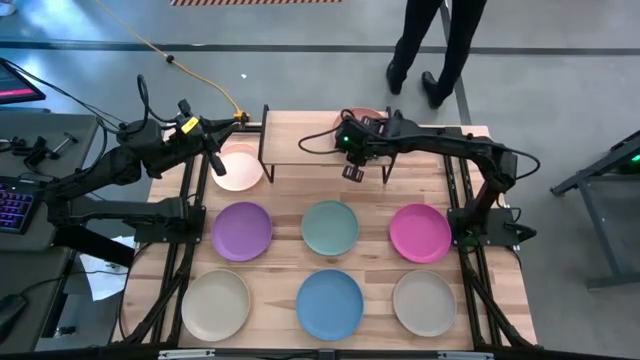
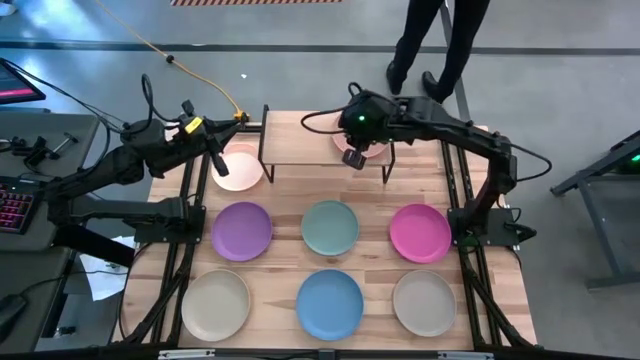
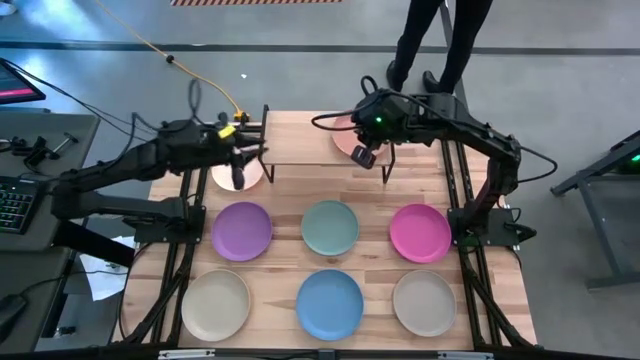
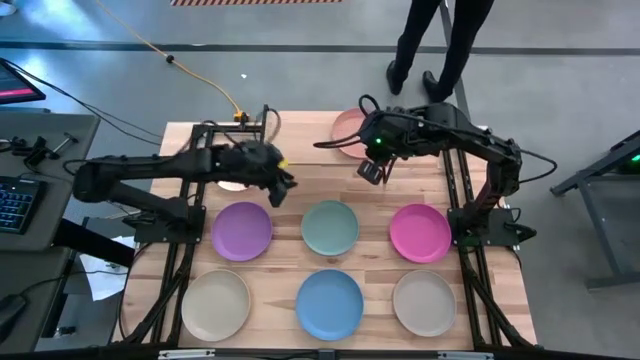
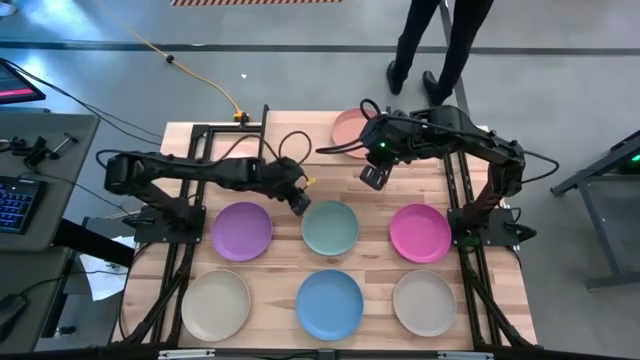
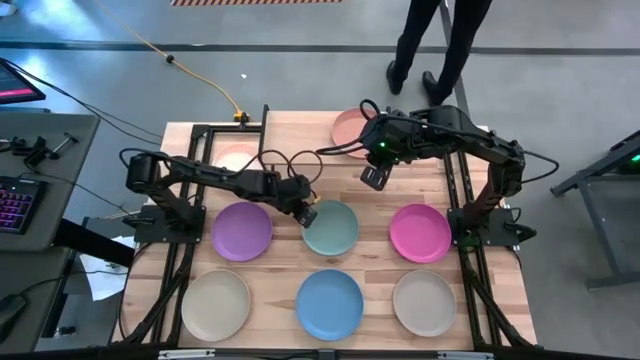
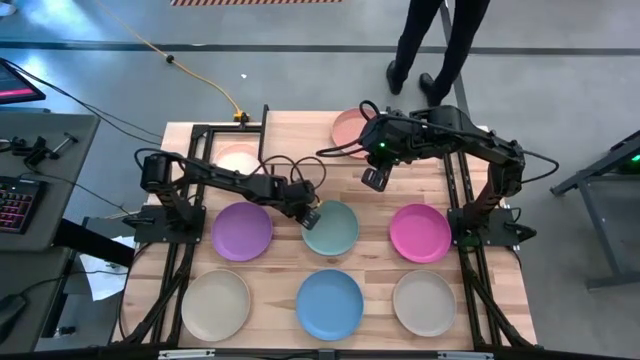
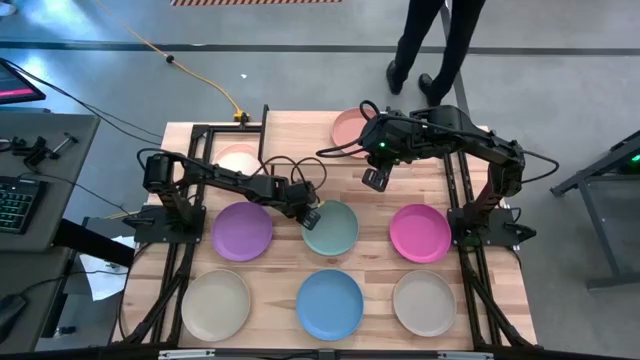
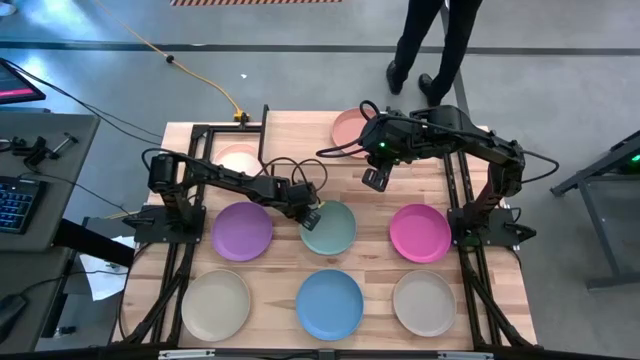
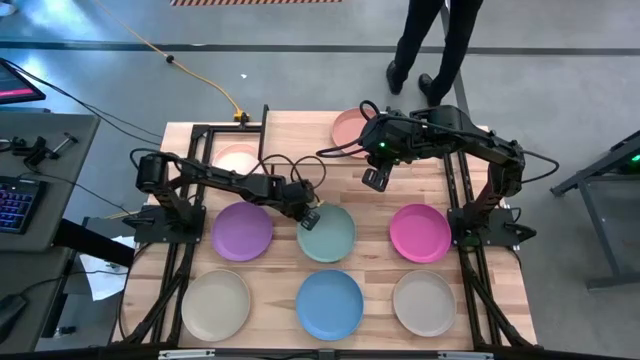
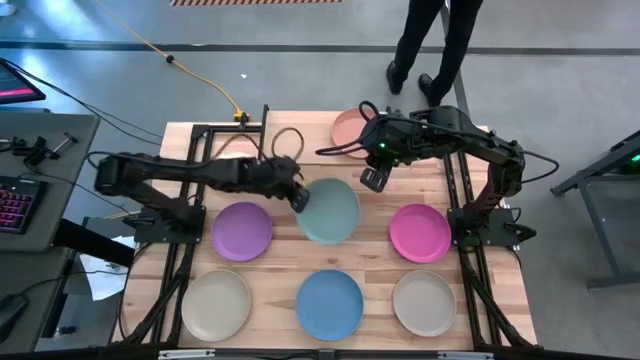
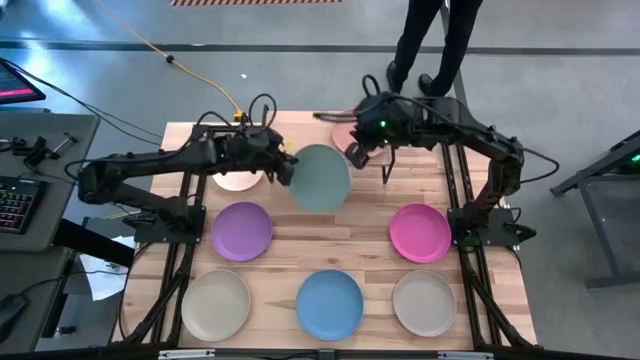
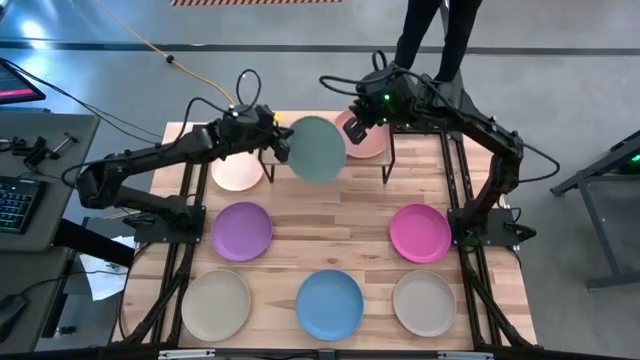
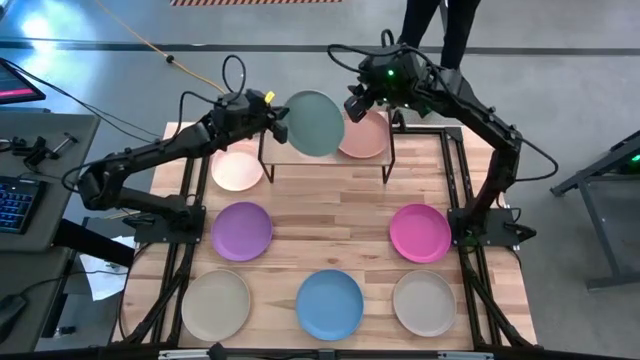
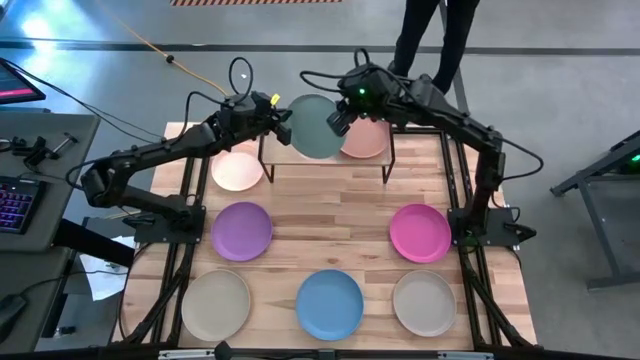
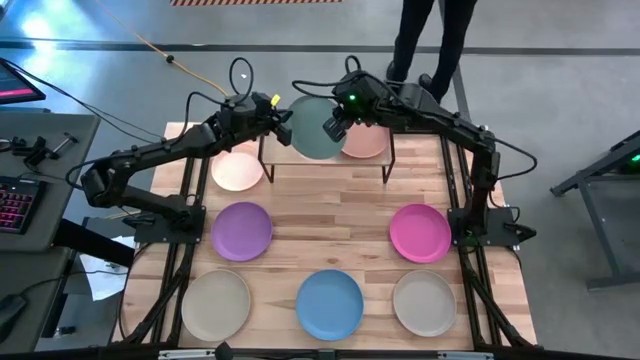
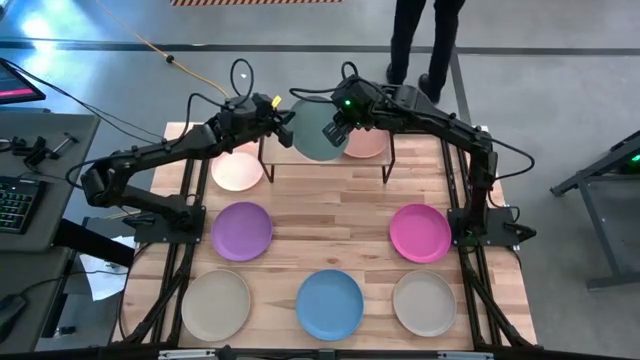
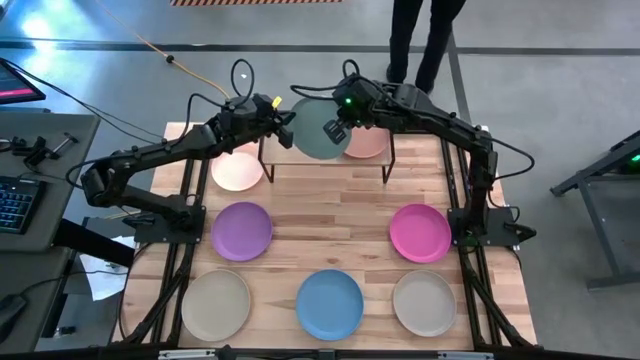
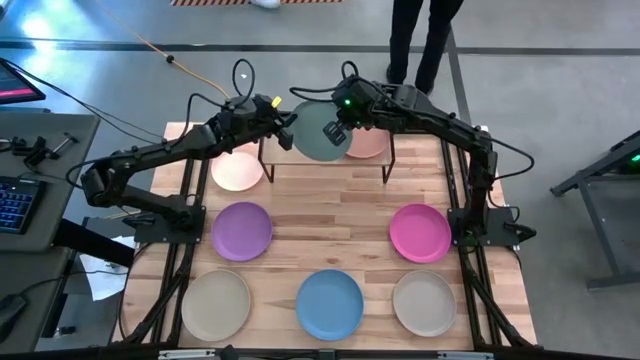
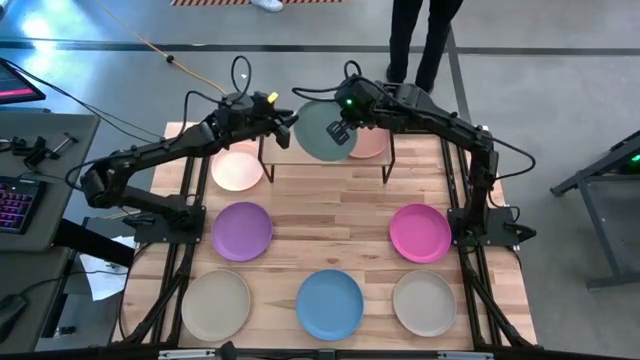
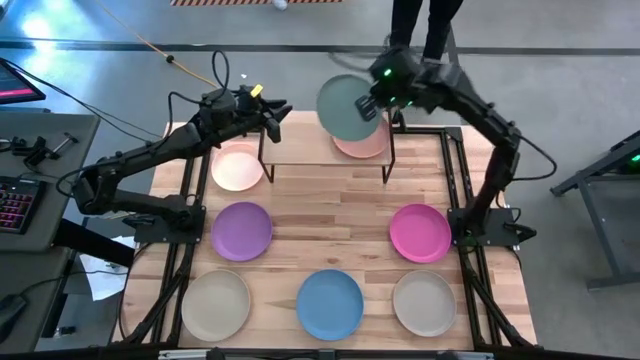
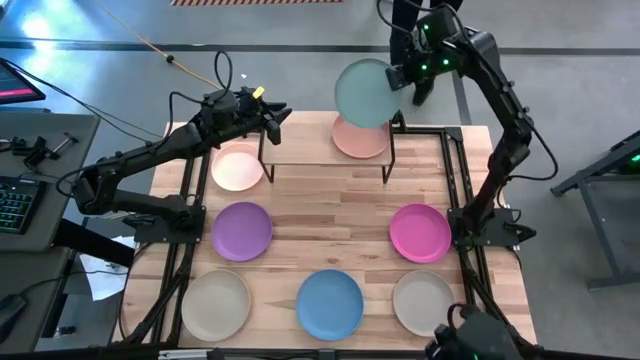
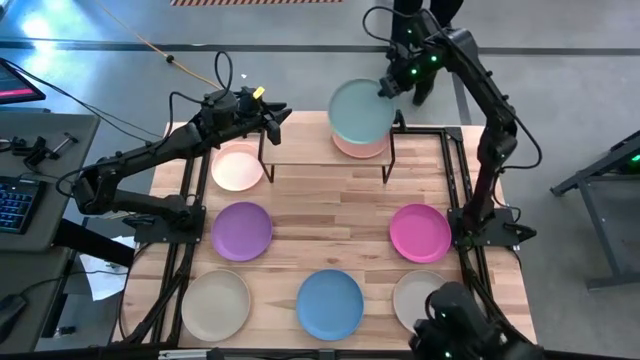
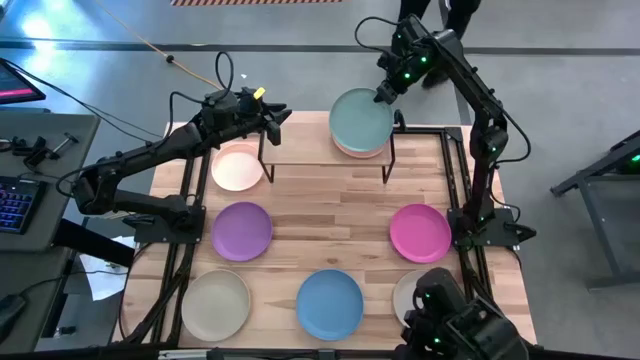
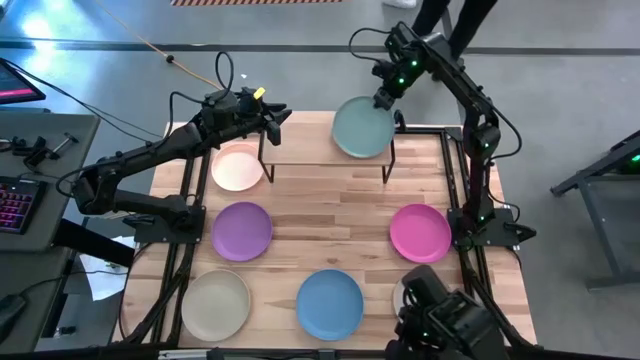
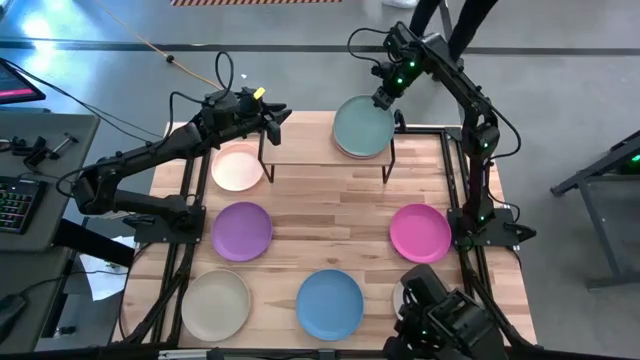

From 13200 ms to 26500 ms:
Task: Place and stack plates onto a shelf
Stack the light green plate on top of the orange plate on the shelf

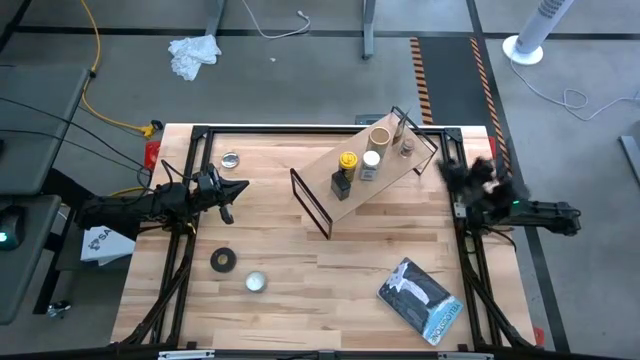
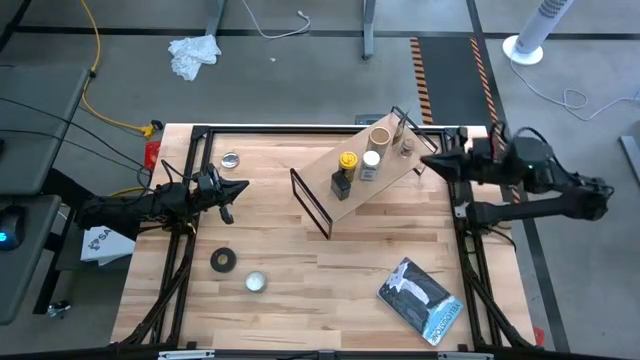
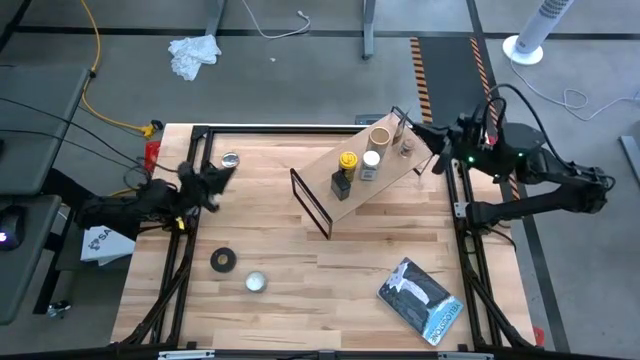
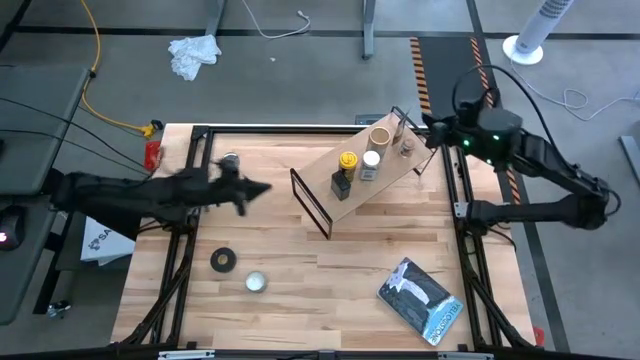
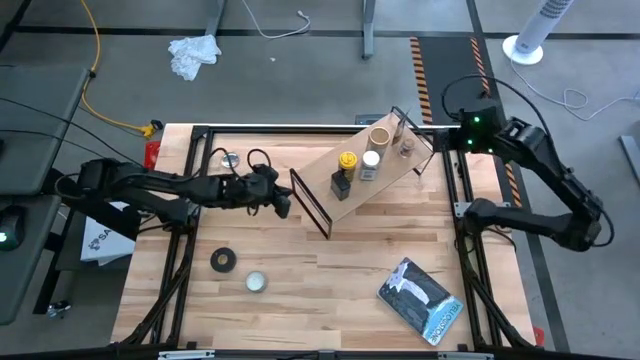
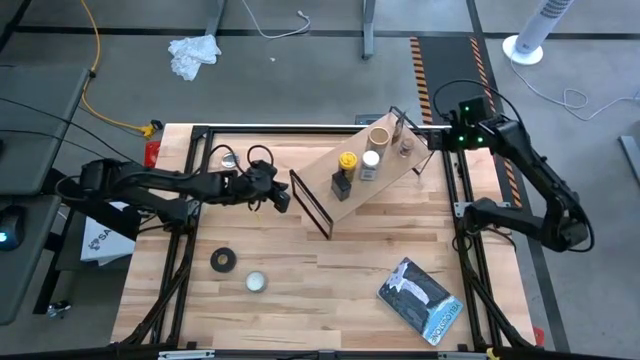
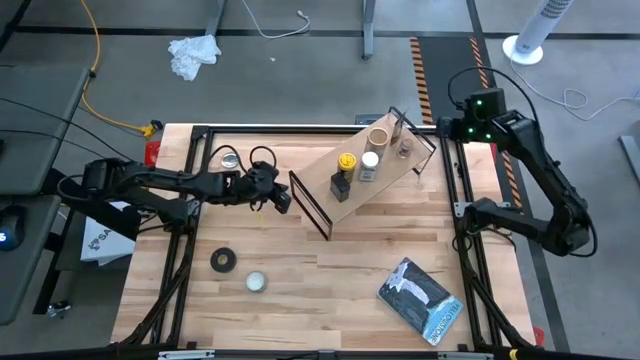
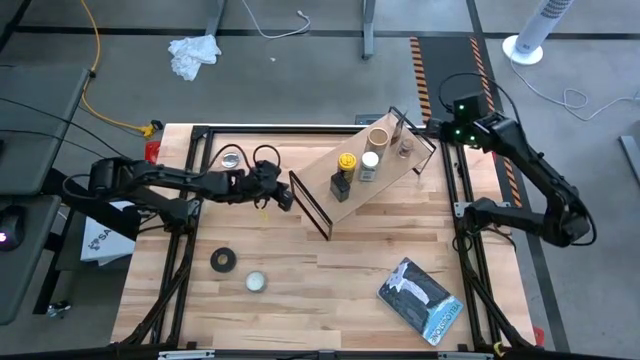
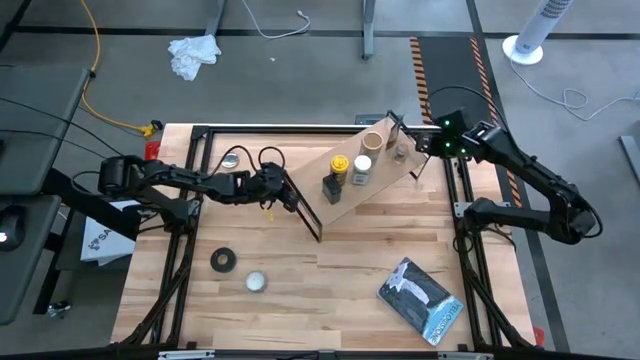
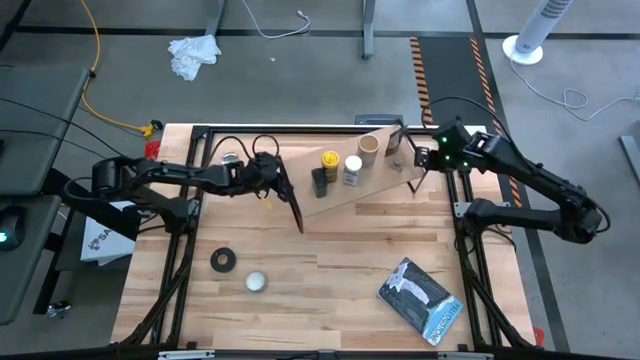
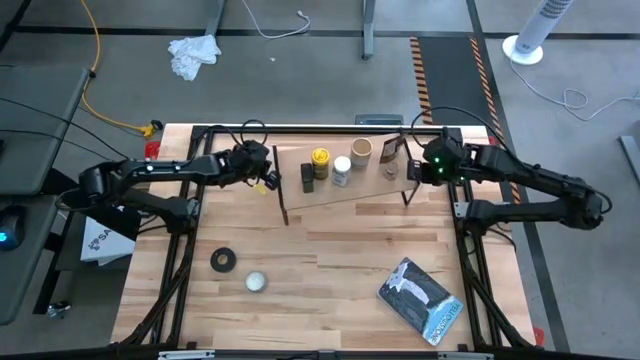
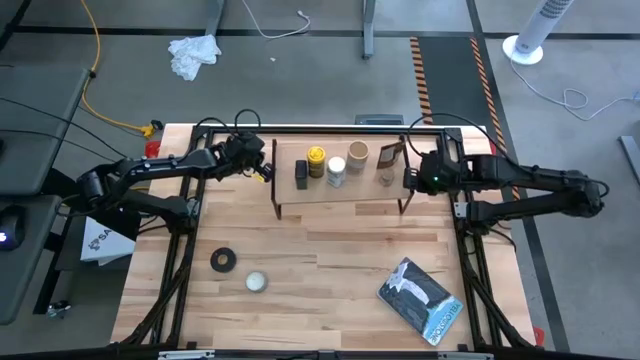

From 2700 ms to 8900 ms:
Task: Shelf spices
Adjust the shelf

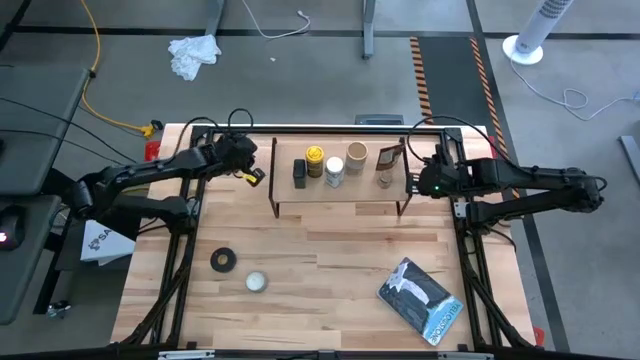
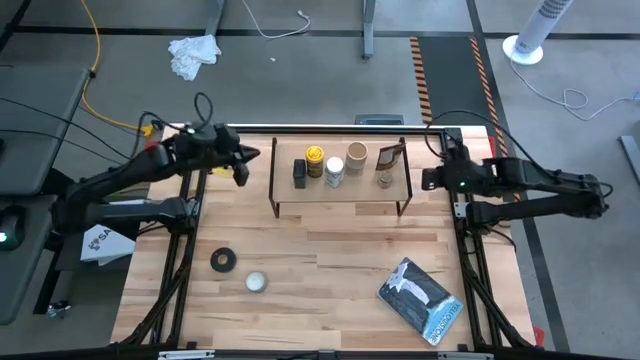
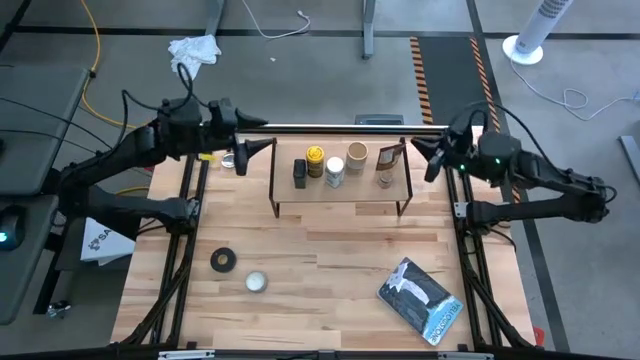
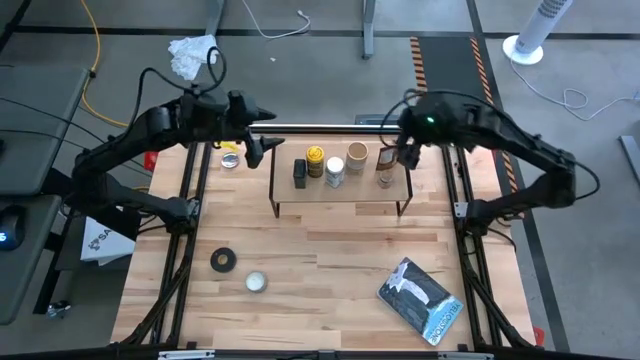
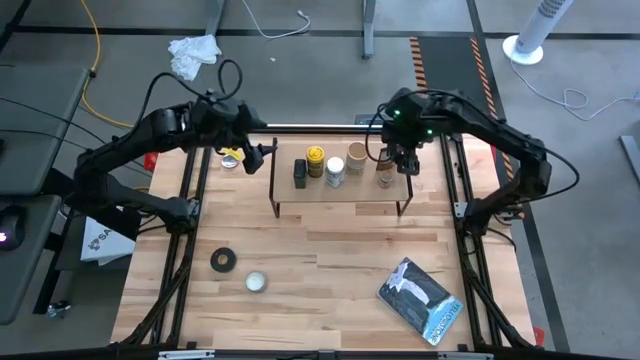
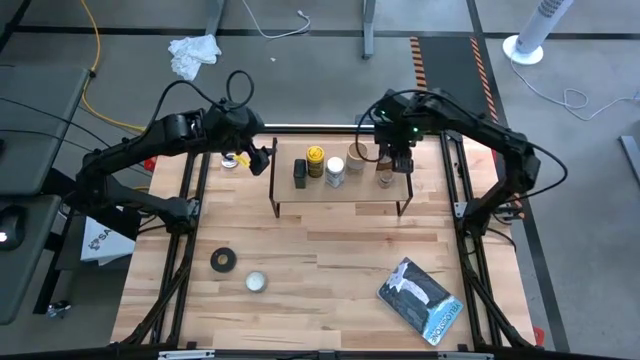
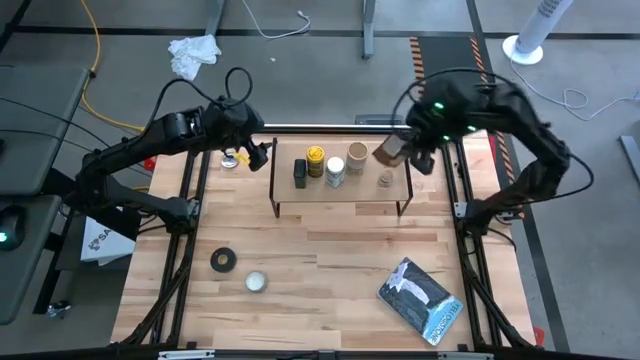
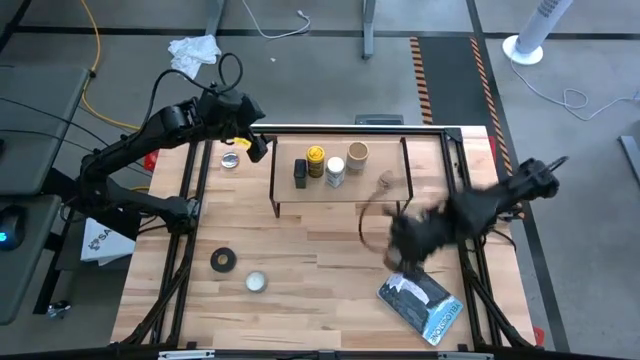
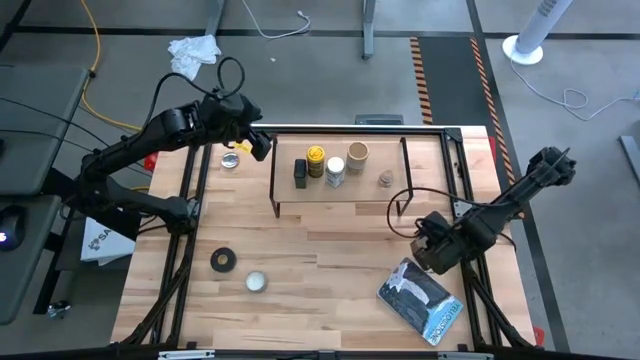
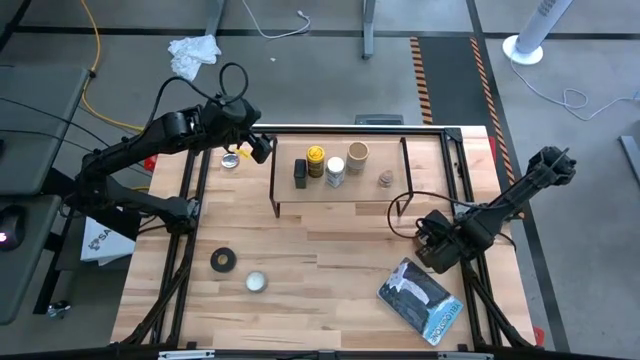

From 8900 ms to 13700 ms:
Remove the orange seasoning pack from the shelf
